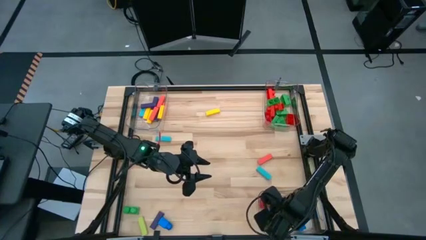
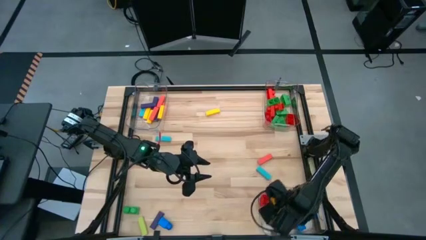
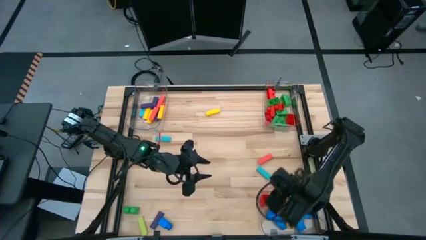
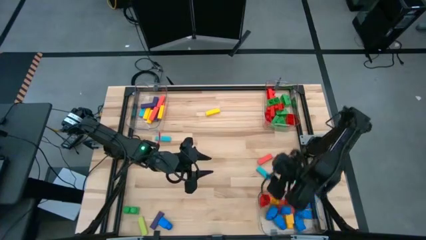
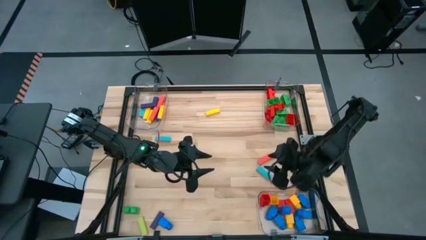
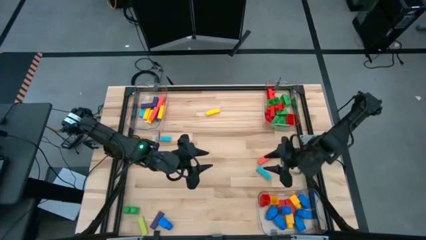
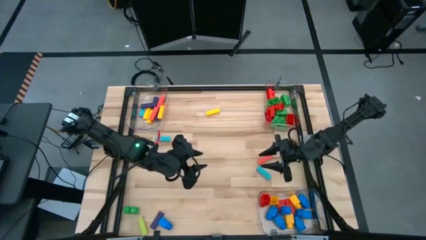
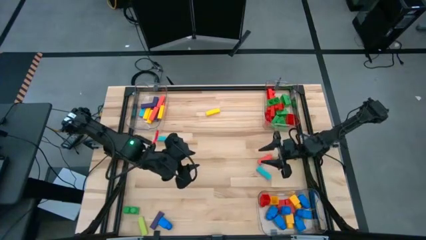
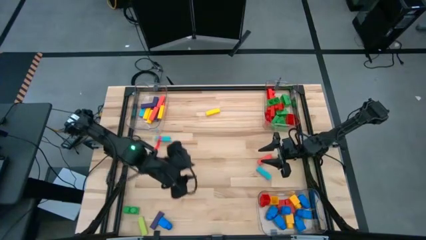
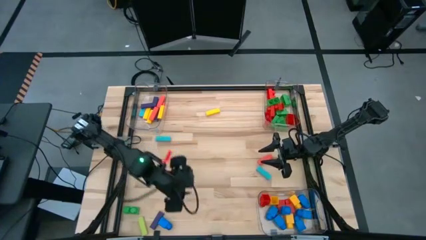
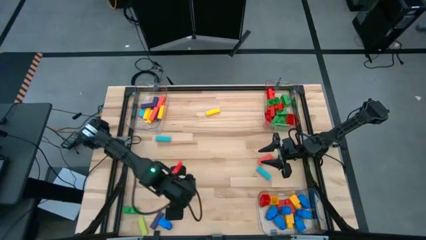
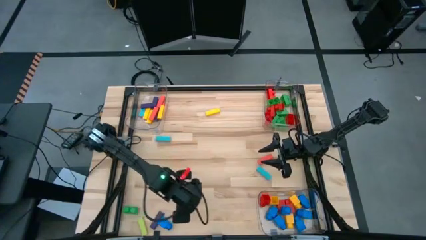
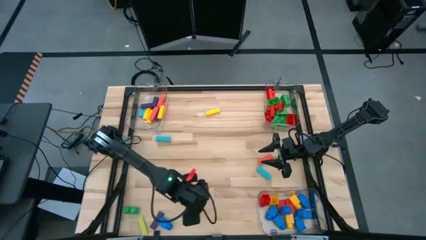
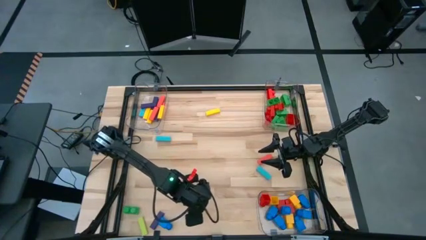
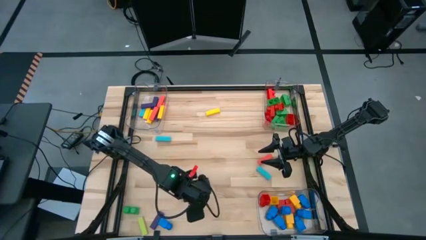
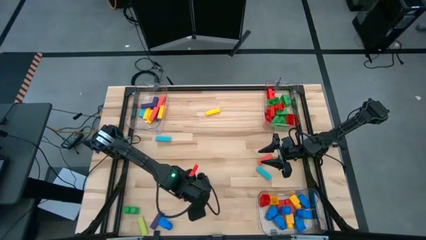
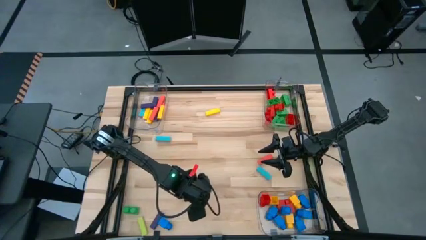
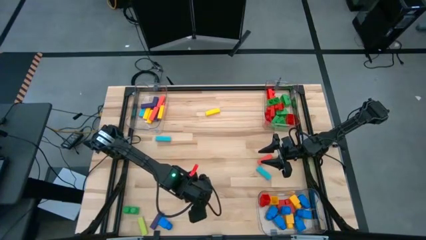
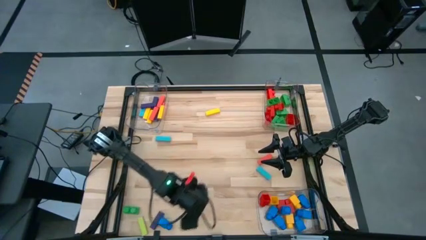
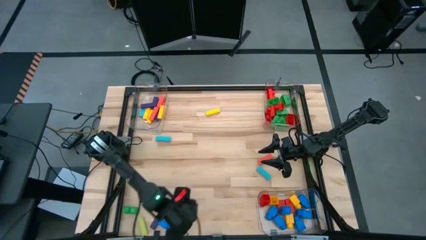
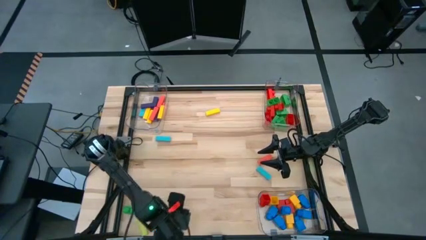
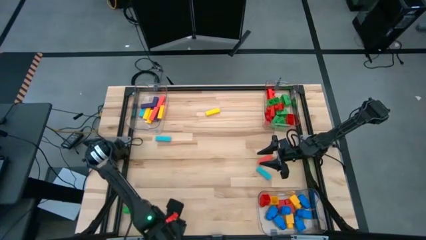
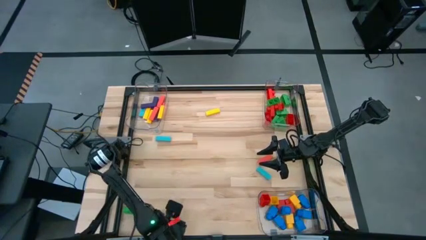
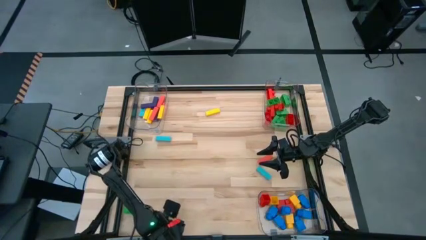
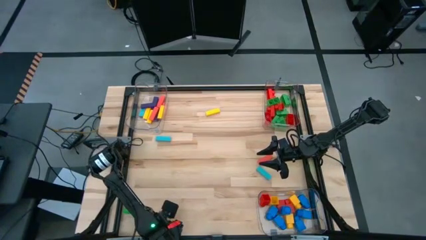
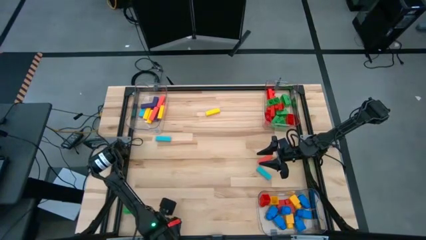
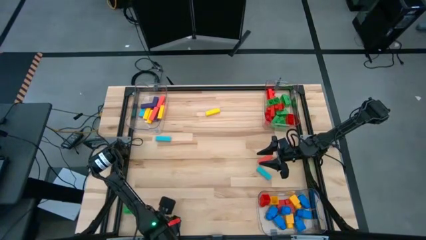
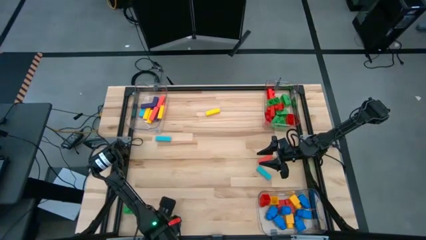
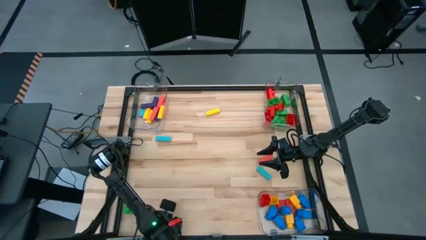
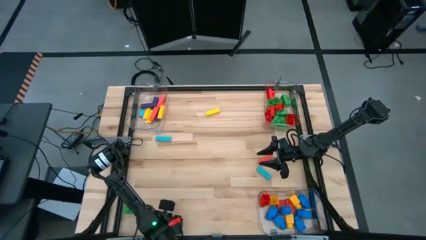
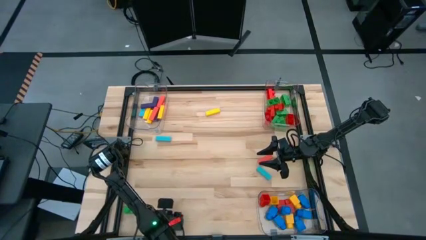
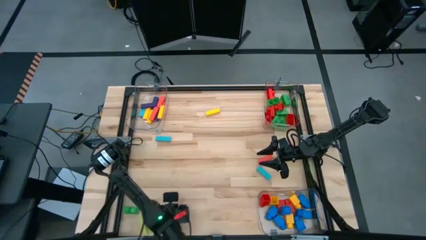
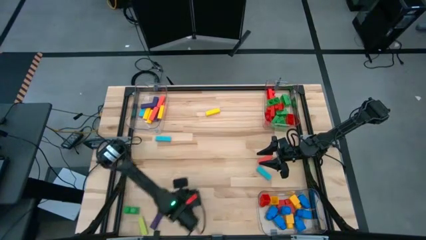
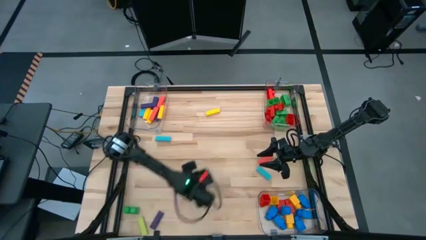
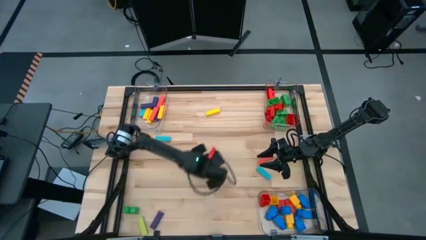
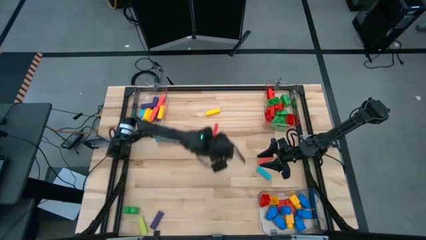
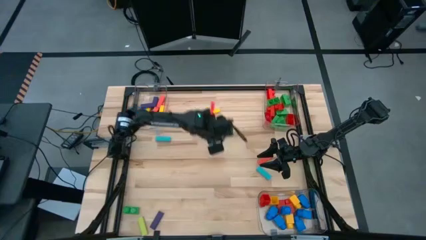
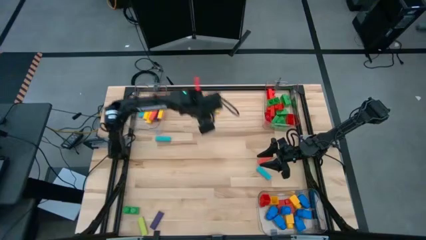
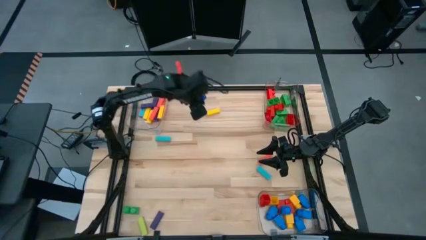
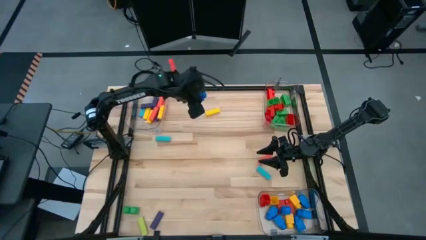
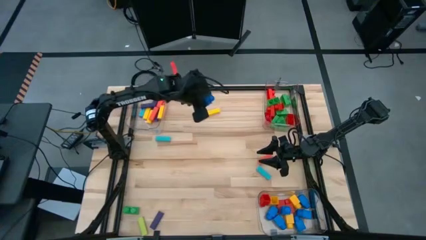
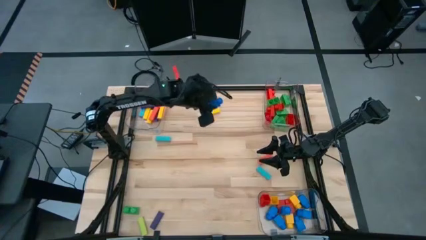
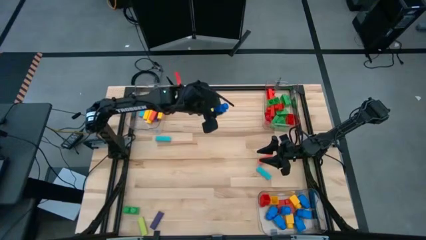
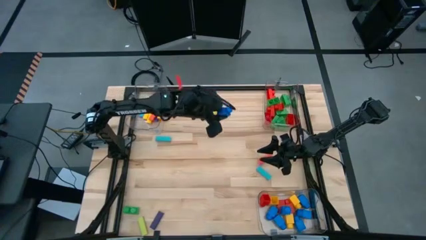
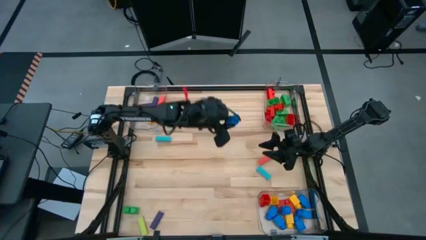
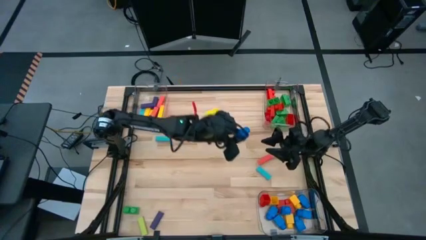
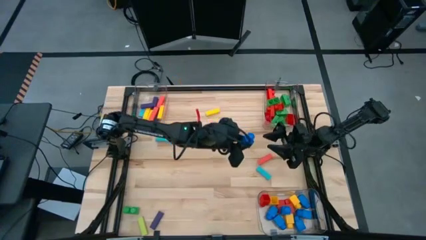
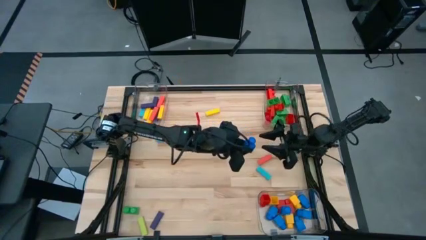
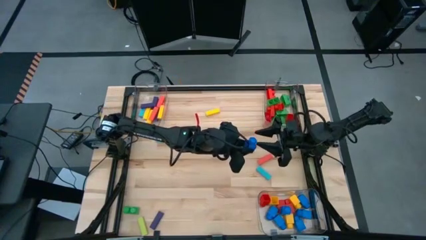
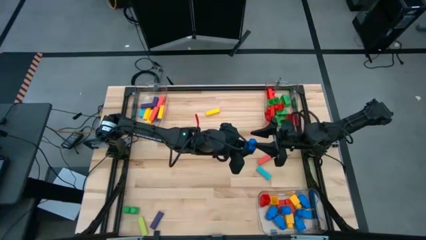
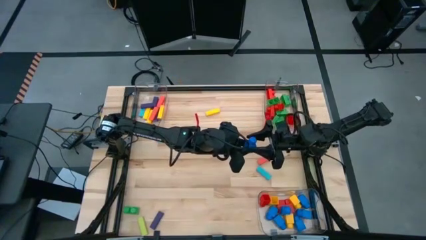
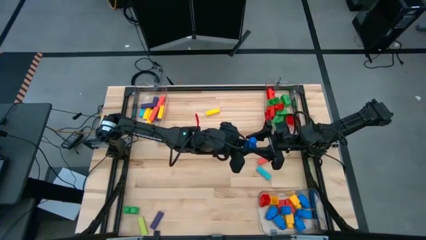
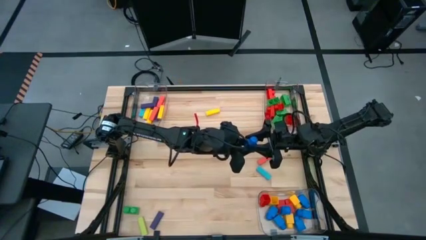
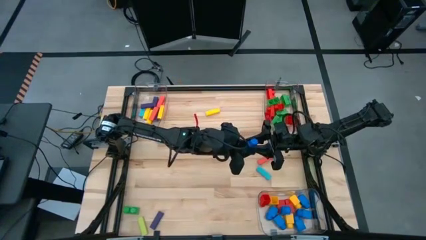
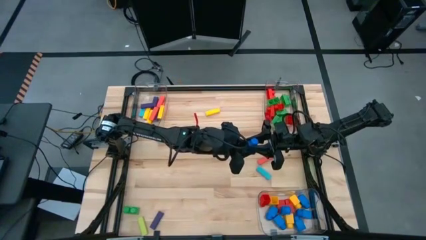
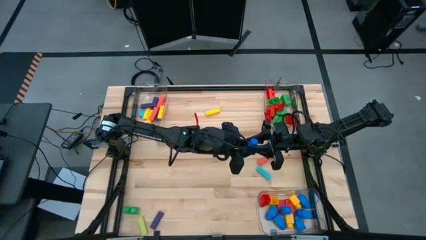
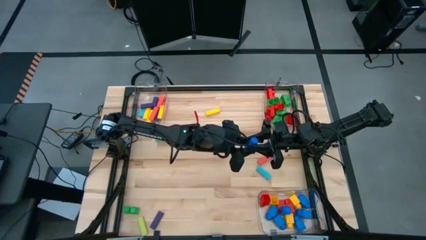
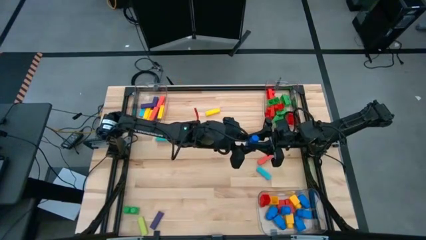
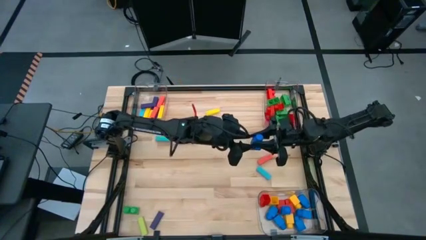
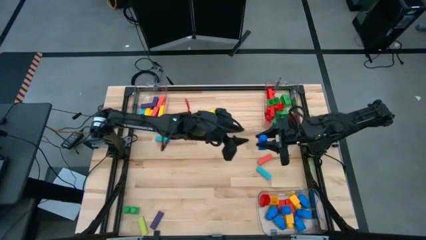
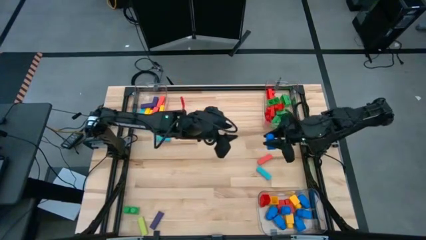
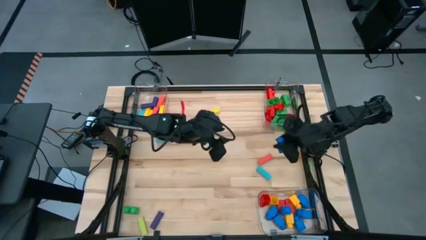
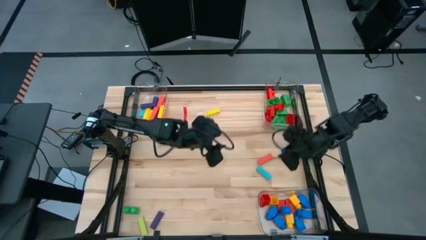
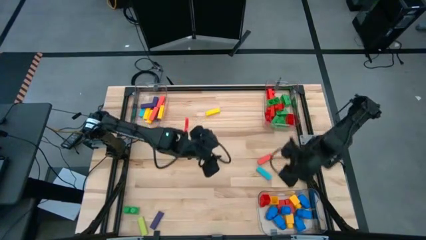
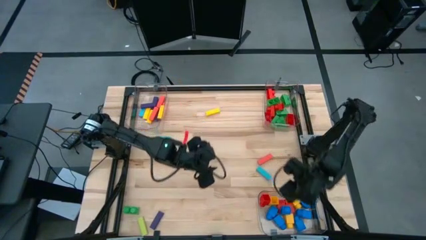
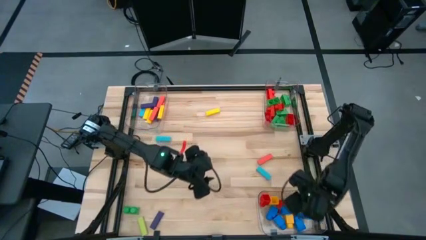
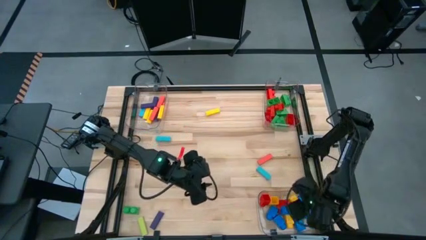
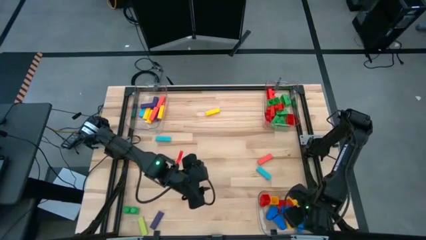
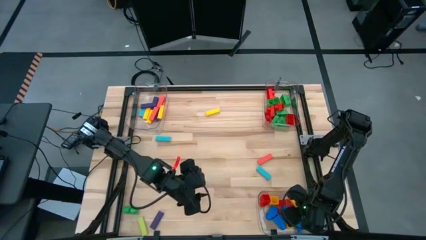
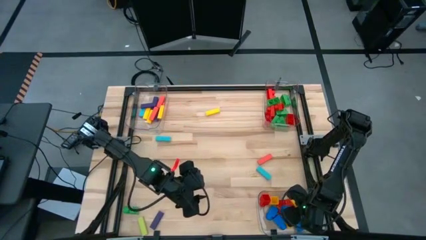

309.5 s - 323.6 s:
Task: Sort blocks by size
Put the blue 1 stud game piece into the bottom transparent bin
